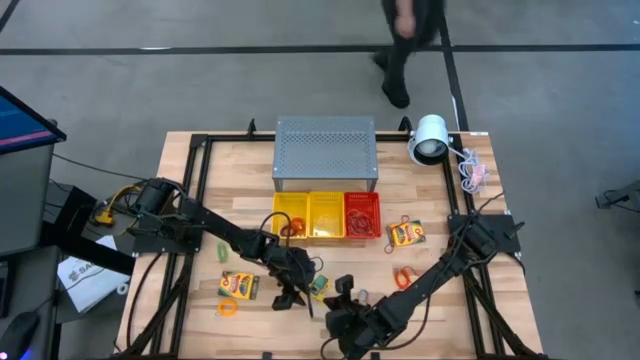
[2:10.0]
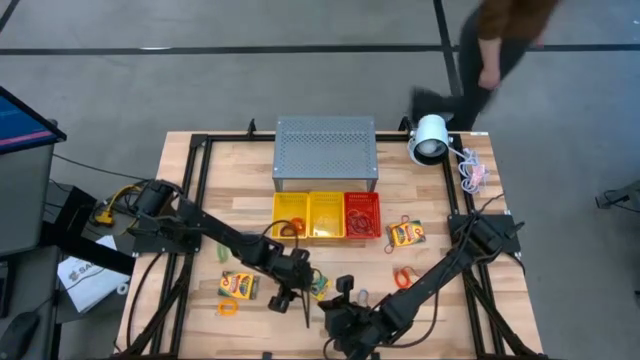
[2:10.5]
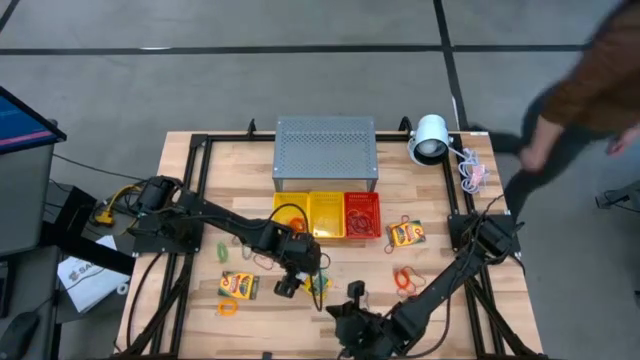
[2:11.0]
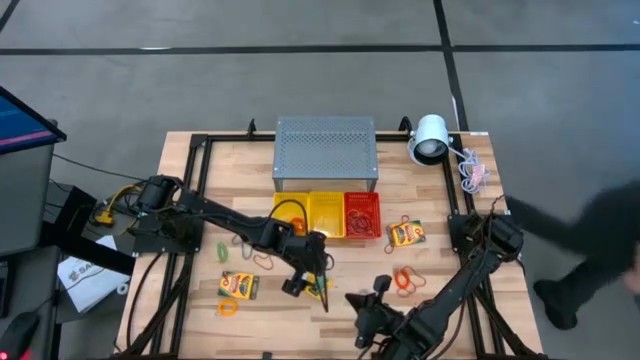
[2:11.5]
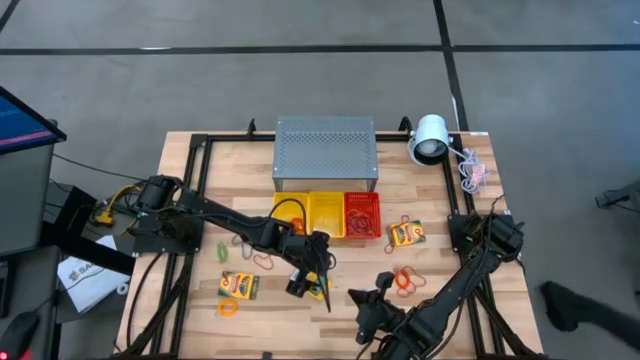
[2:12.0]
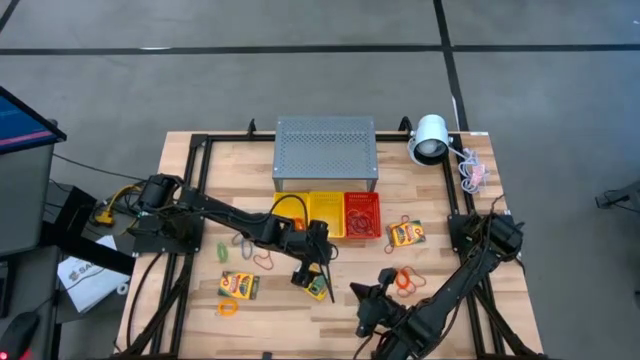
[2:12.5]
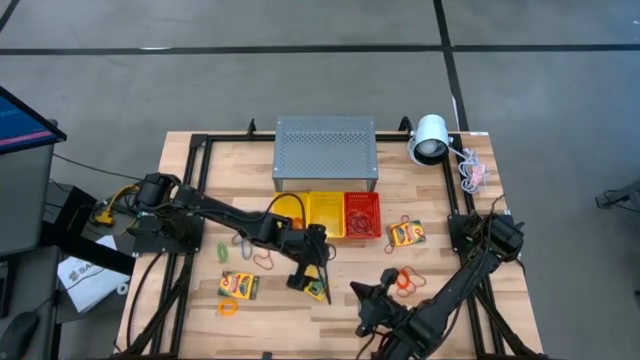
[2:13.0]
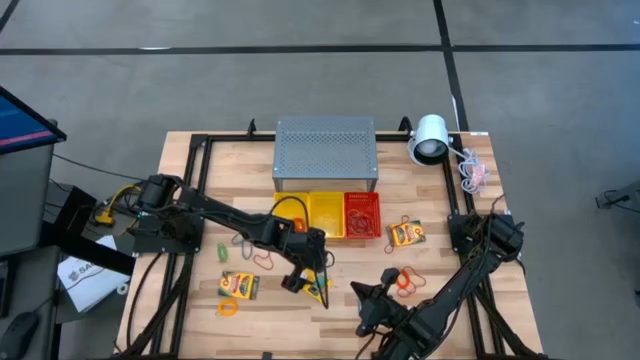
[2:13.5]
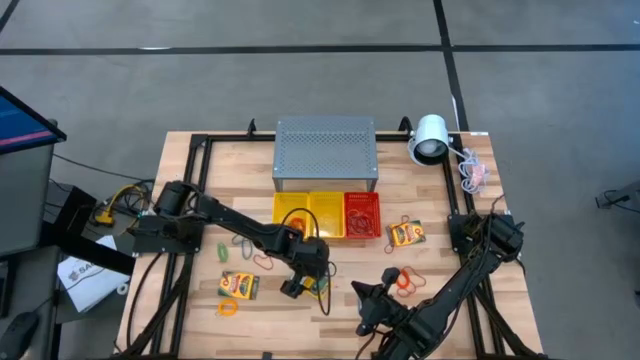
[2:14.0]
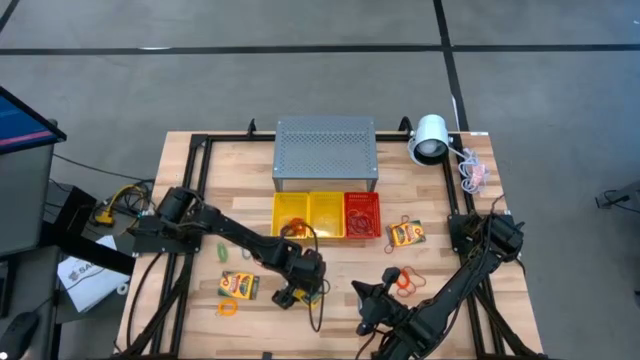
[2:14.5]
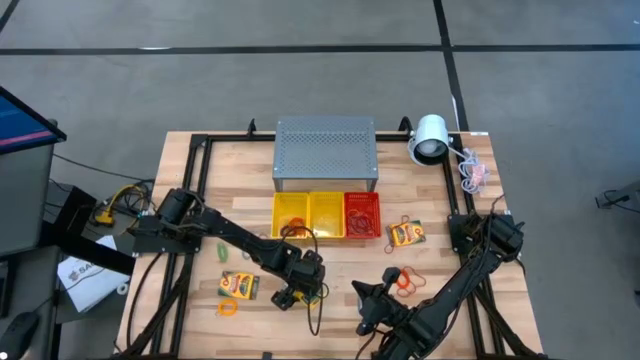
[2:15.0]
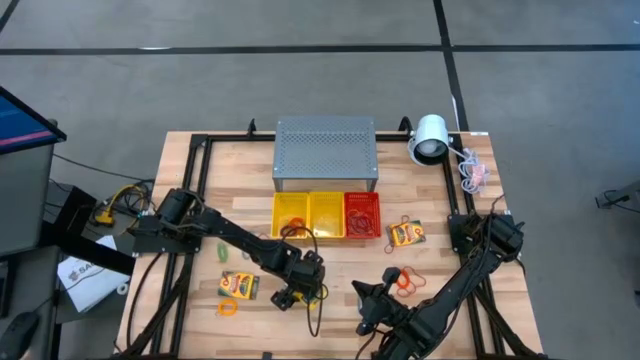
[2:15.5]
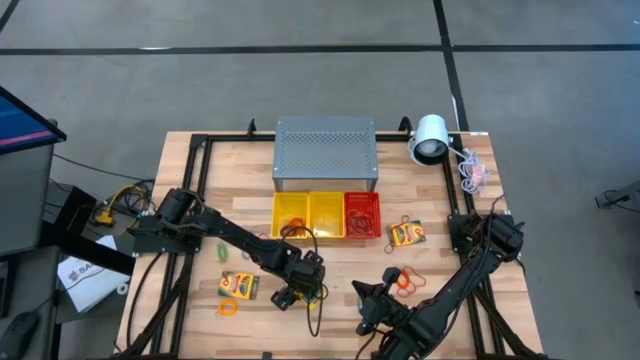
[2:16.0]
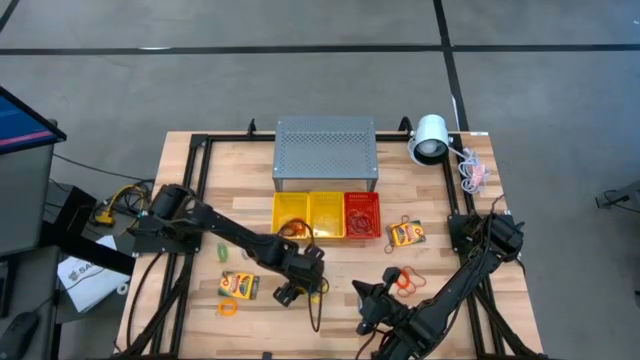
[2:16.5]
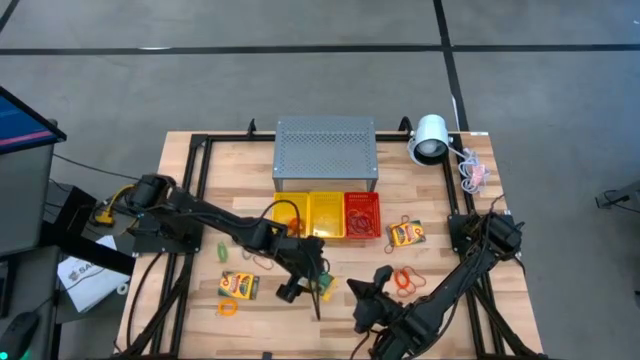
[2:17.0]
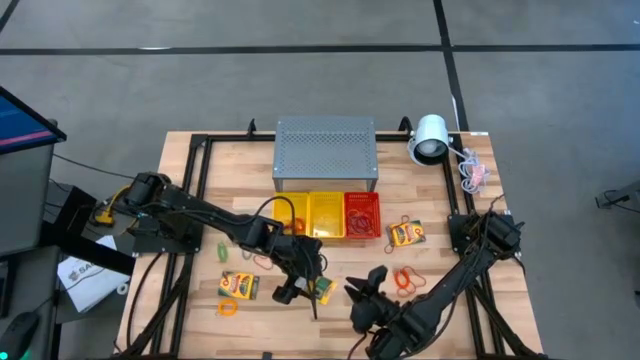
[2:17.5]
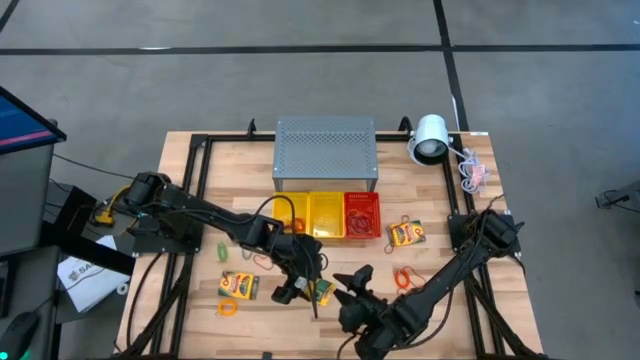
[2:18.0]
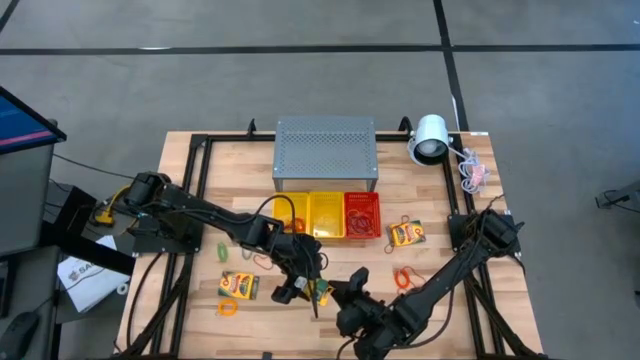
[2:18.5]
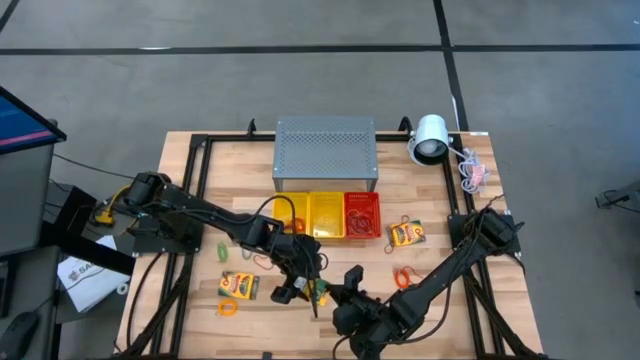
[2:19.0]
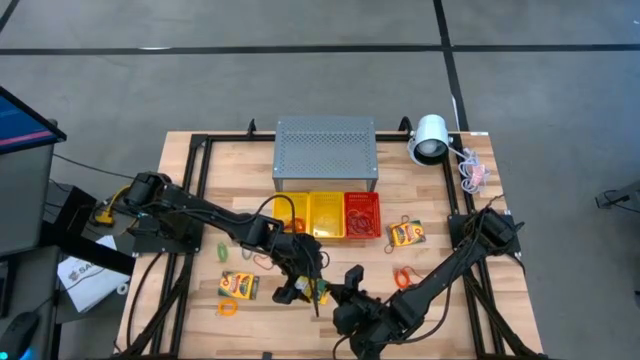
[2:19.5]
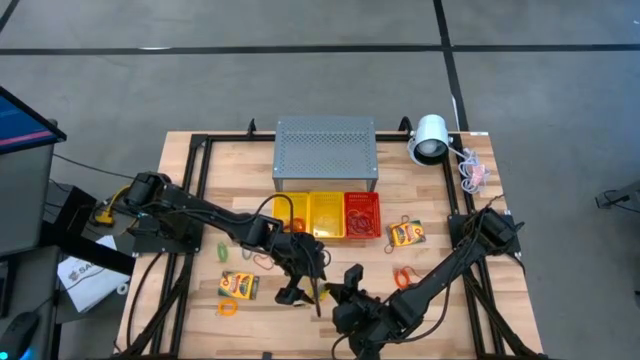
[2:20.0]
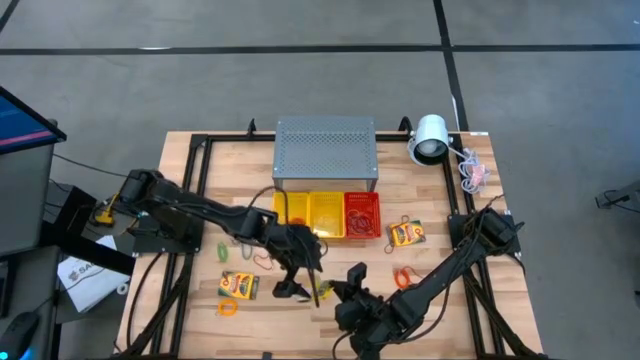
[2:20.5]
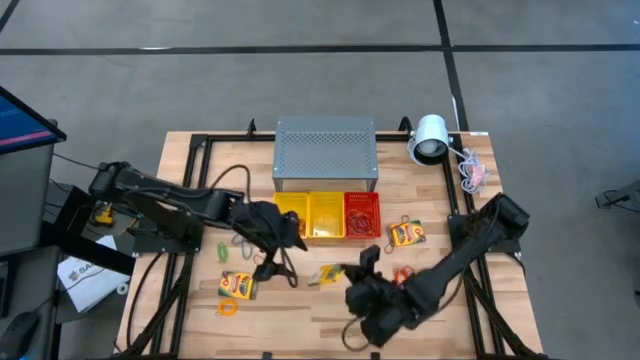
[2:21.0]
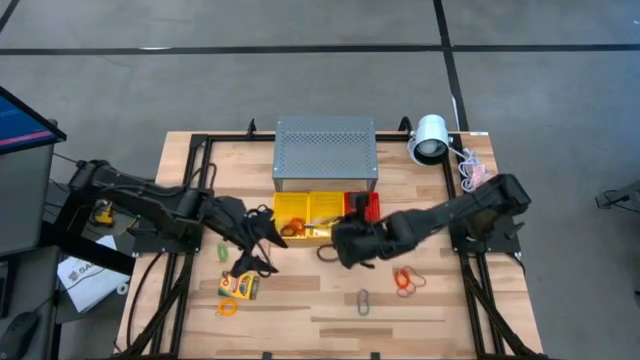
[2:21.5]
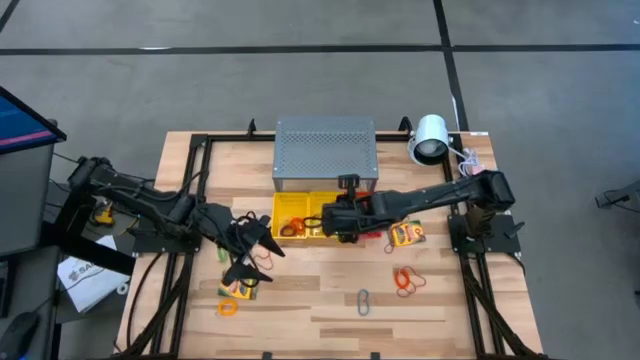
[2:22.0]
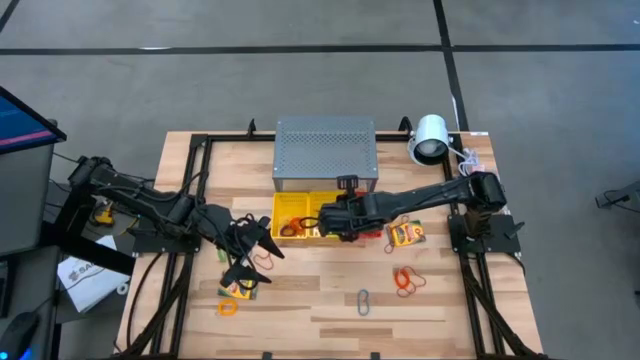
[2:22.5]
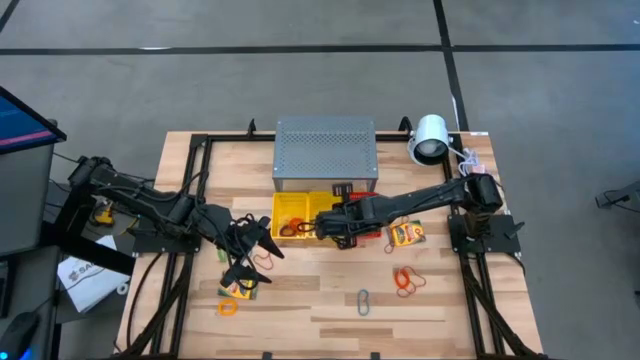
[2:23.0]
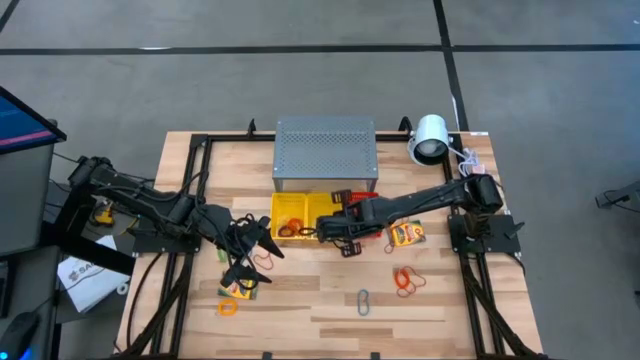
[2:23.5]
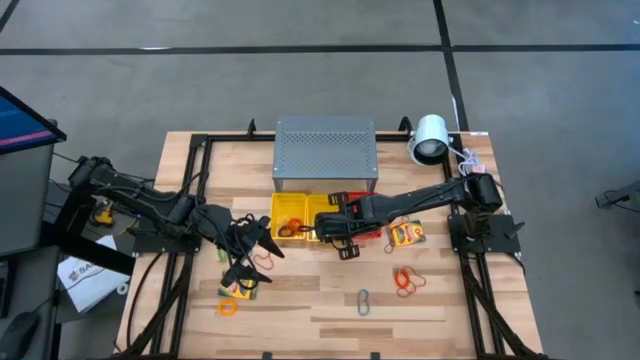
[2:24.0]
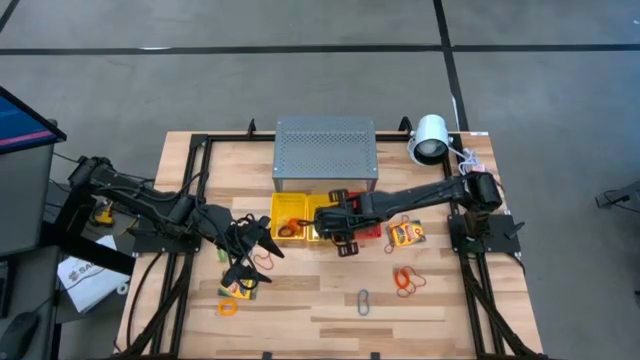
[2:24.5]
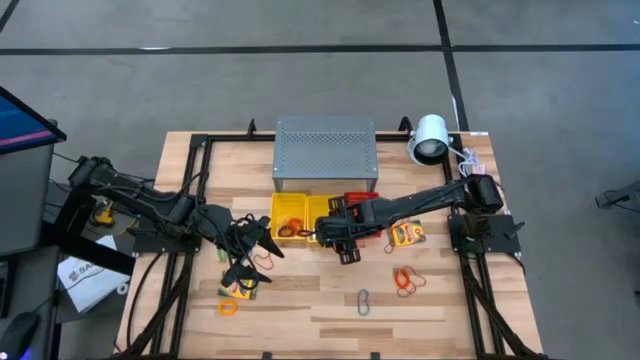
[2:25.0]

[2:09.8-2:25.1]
Task: Pick & Place Office Desk Supplies
Put the yellow crayon box into the right yellow bin

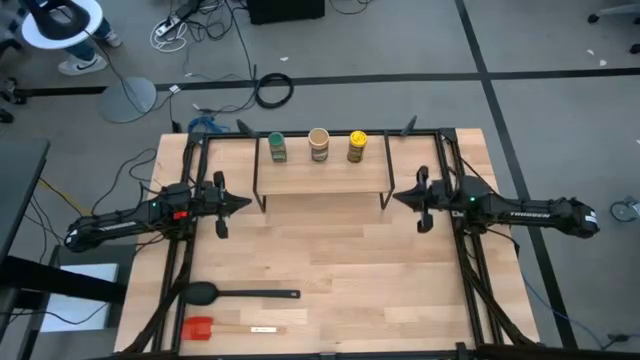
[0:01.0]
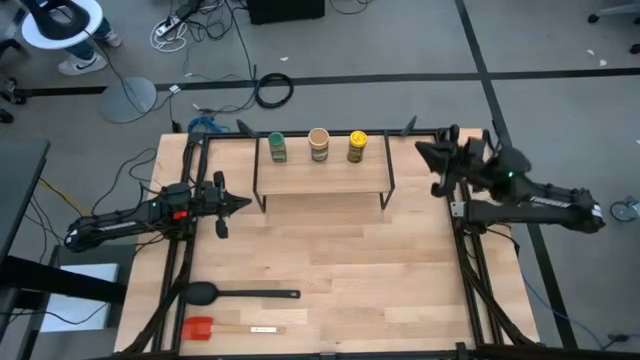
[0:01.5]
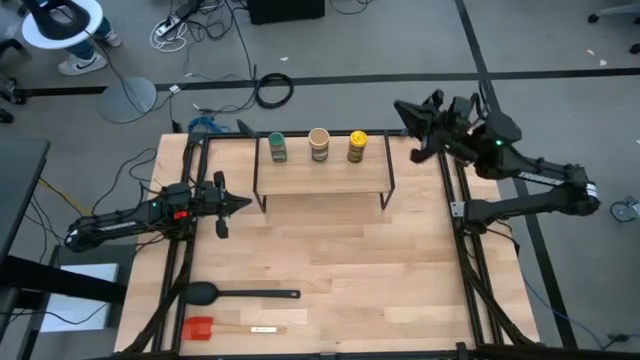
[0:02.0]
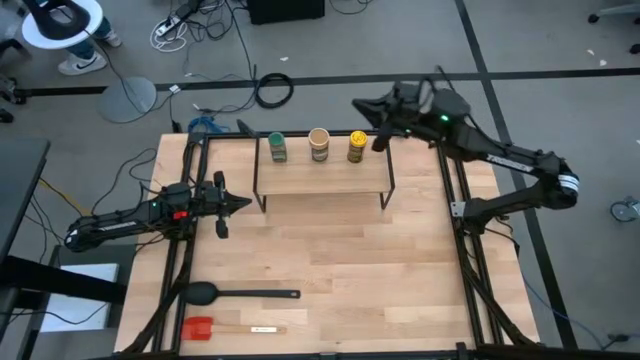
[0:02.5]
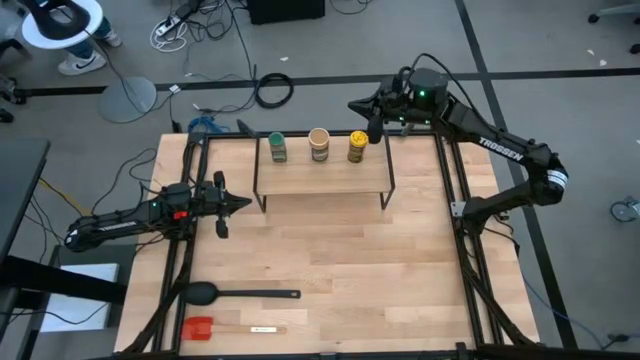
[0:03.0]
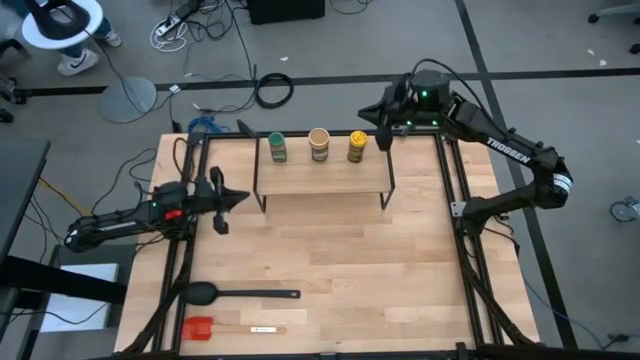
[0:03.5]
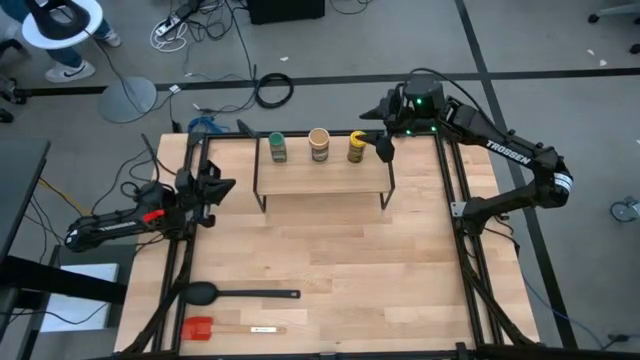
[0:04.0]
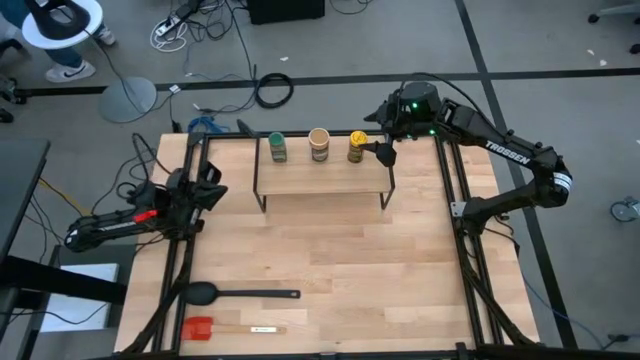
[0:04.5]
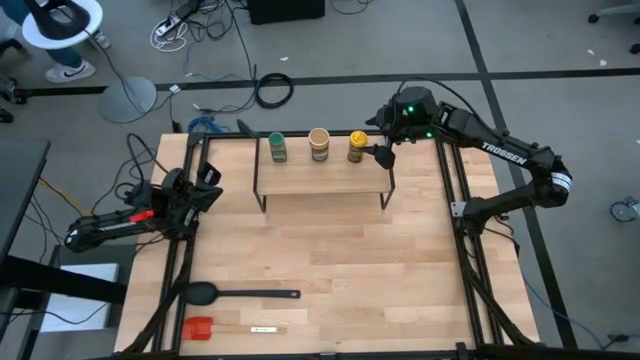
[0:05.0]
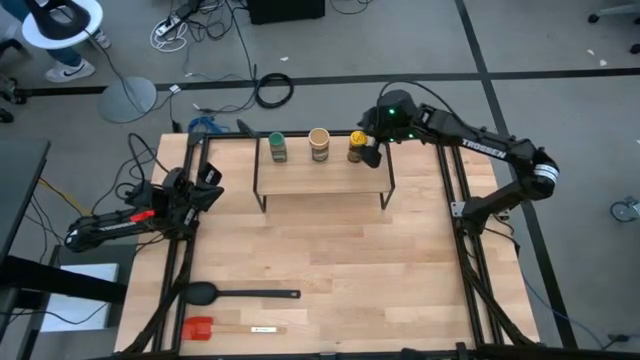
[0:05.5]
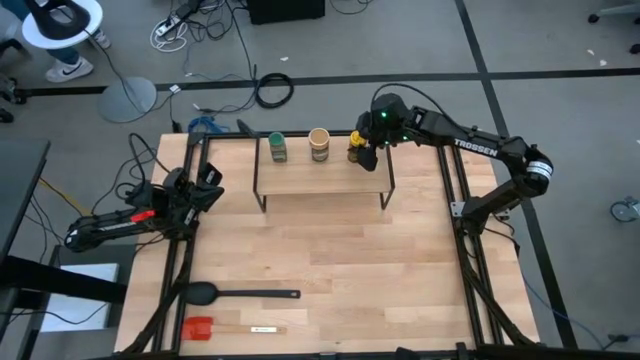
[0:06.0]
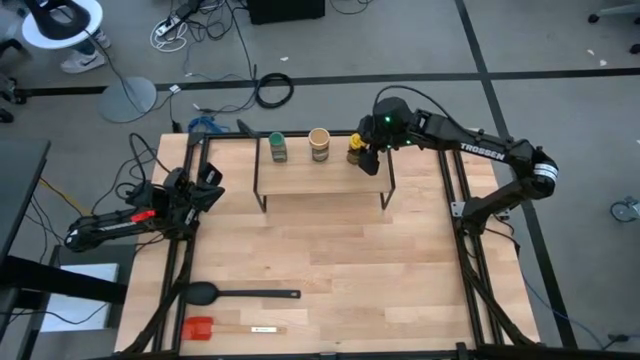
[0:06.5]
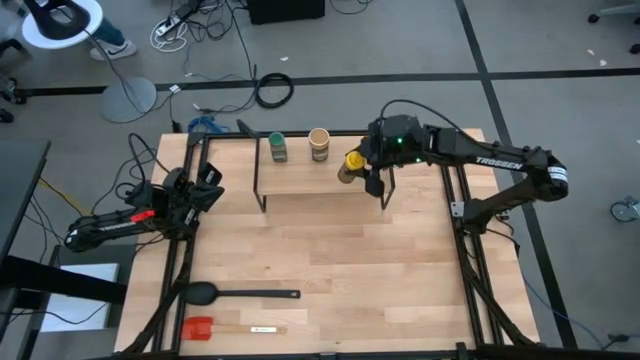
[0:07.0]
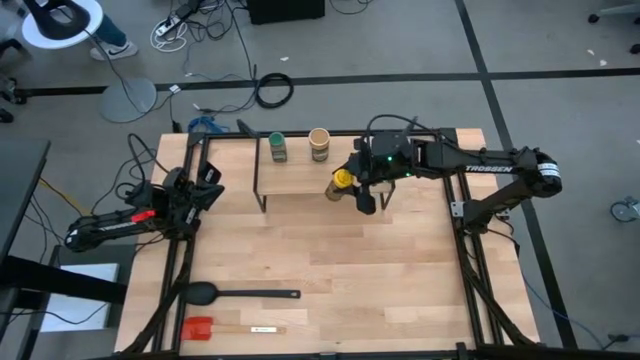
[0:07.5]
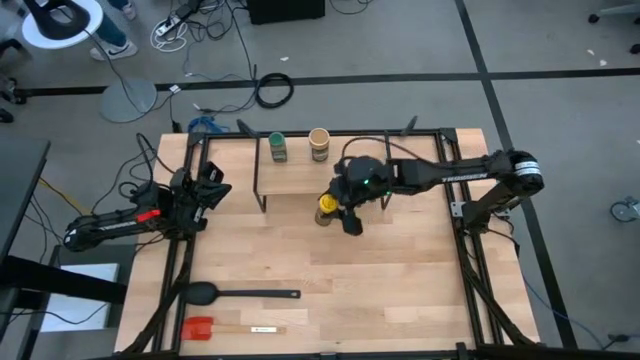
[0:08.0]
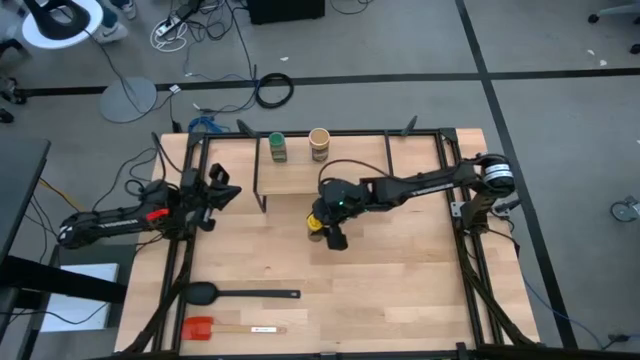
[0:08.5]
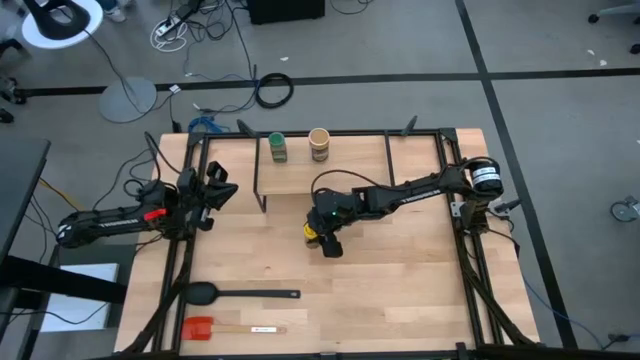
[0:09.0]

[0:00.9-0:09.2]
Task: Shelf spices
Remove the yellow seasoning bottle from the shelf
